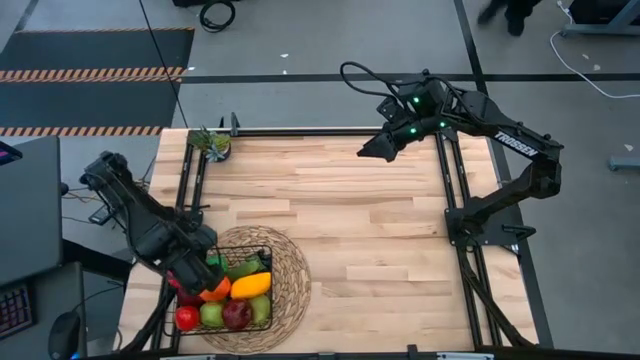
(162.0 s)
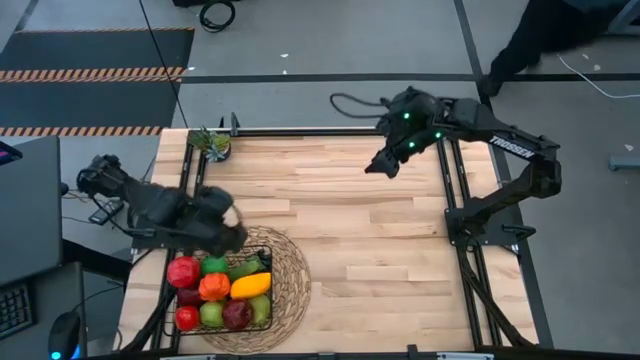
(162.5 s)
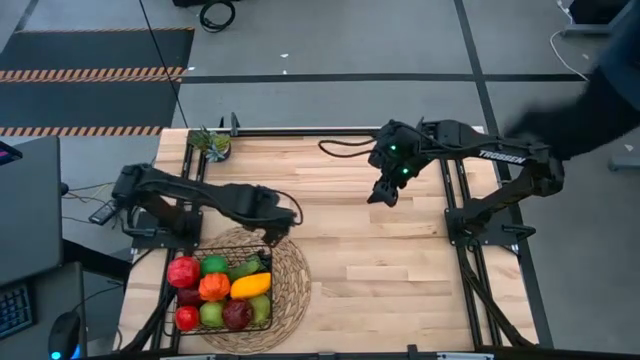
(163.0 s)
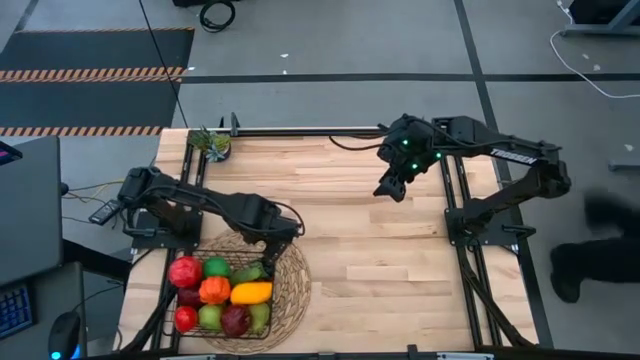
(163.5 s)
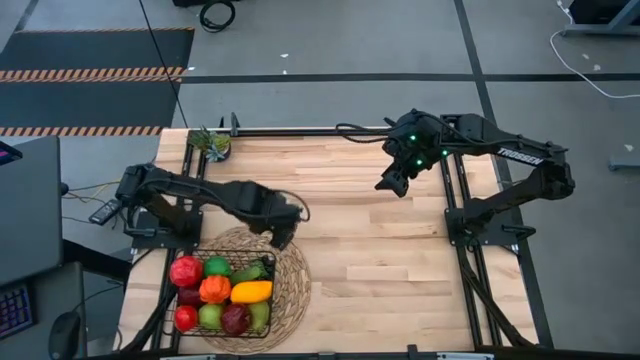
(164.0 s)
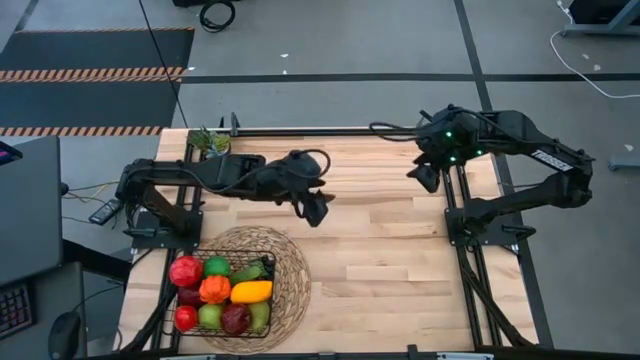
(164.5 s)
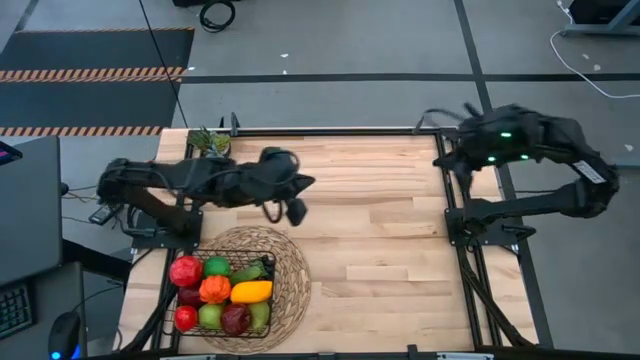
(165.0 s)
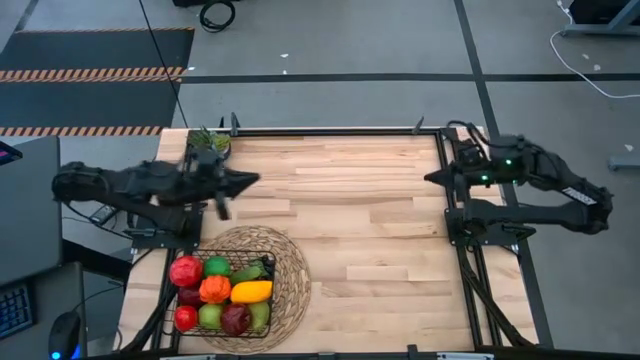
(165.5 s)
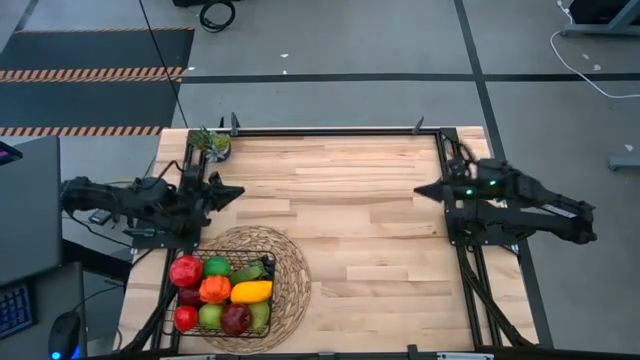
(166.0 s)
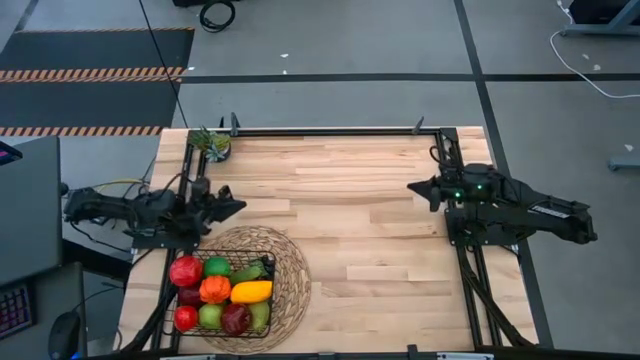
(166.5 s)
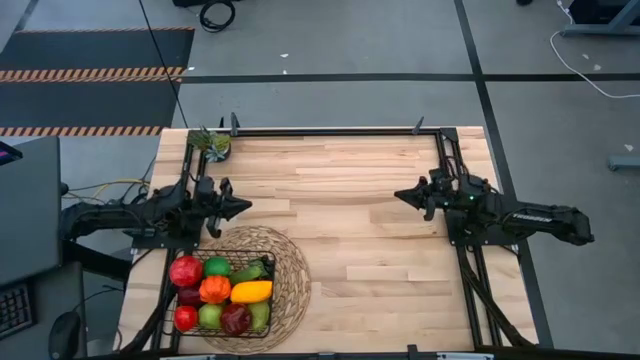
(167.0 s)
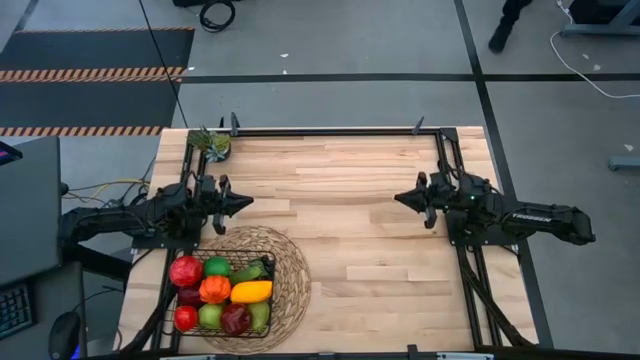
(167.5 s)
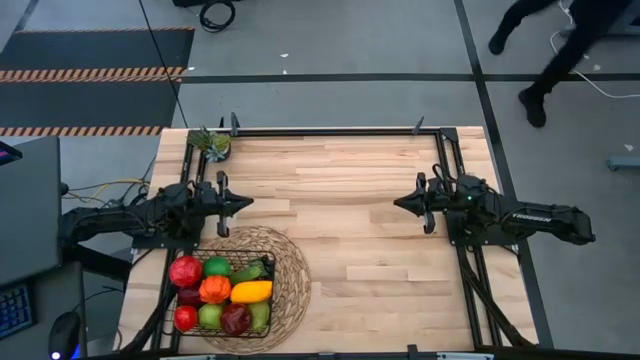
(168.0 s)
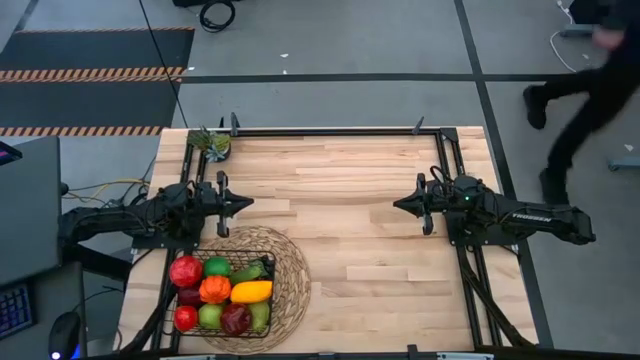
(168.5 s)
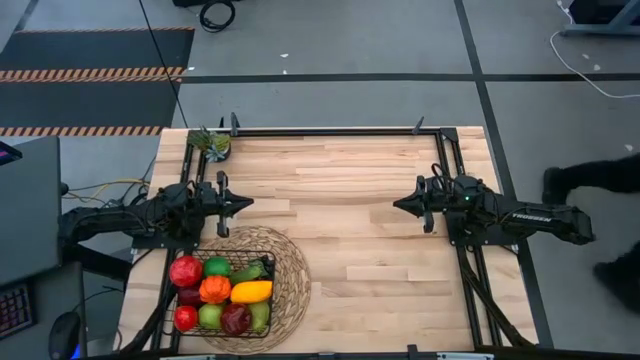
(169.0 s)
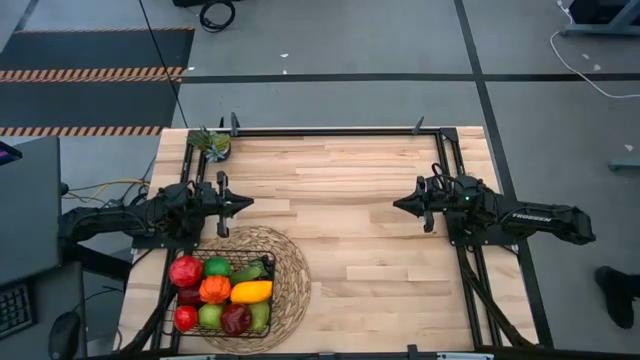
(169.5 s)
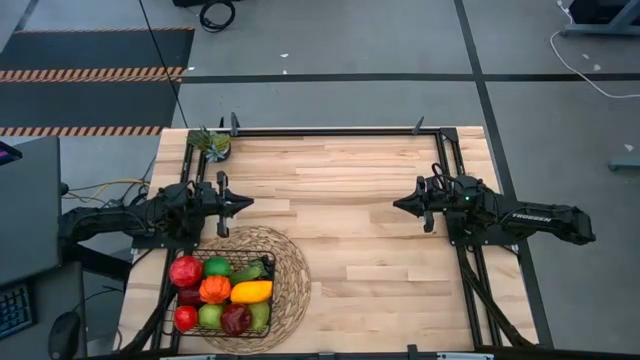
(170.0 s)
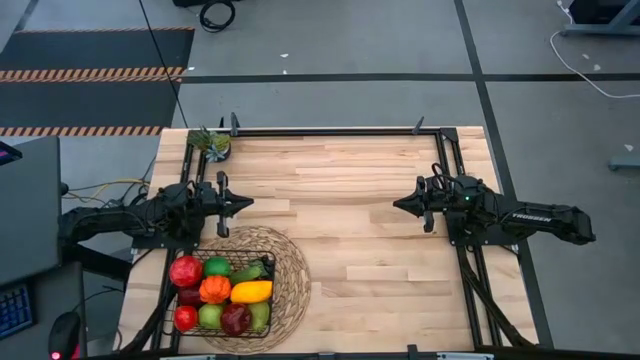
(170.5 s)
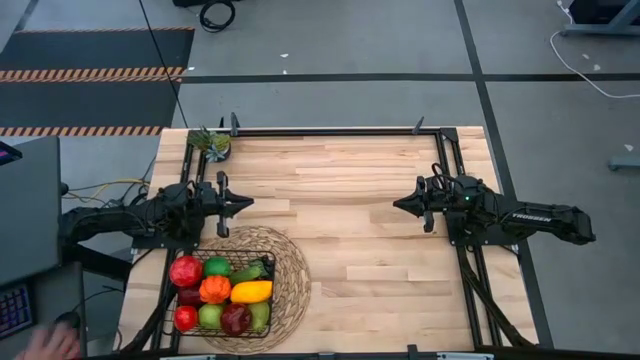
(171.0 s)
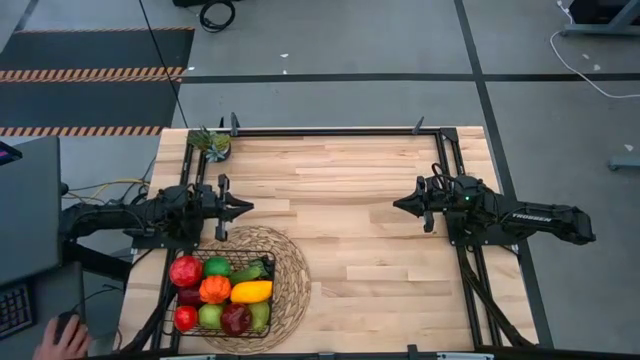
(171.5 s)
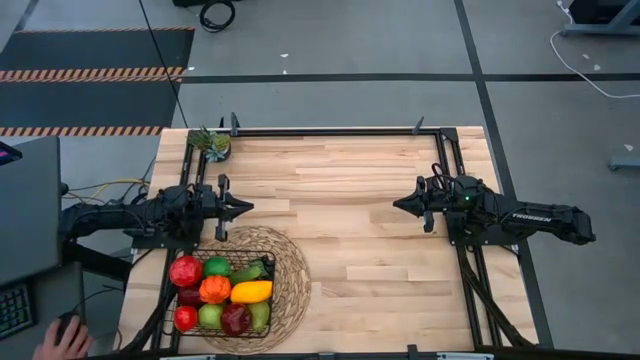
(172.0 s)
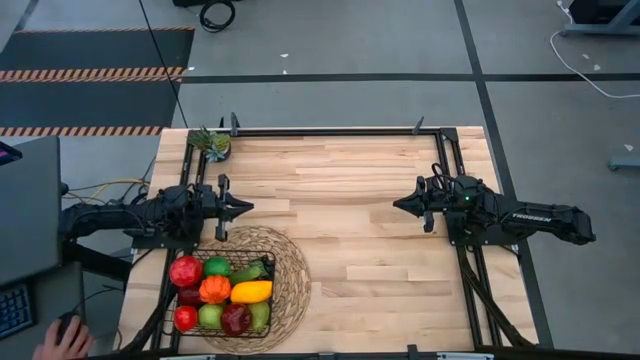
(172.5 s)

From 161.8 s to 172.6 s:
Task: Build produce basket
Return to Home Position

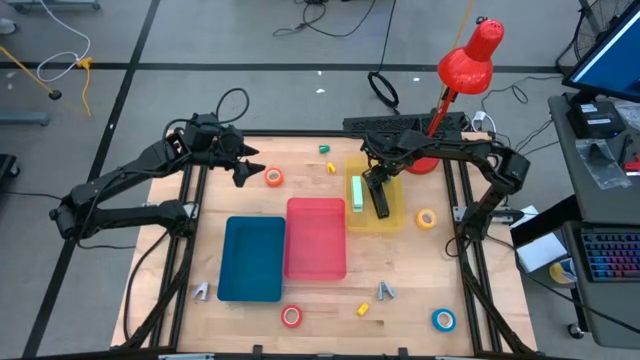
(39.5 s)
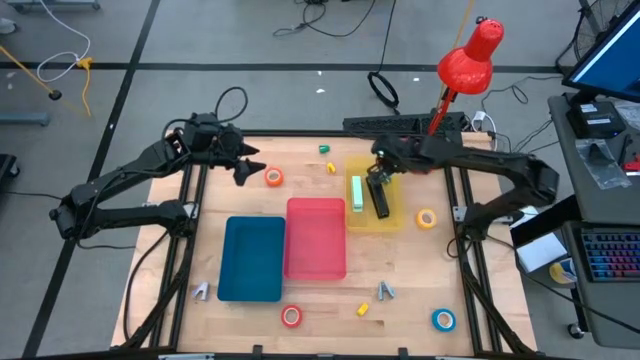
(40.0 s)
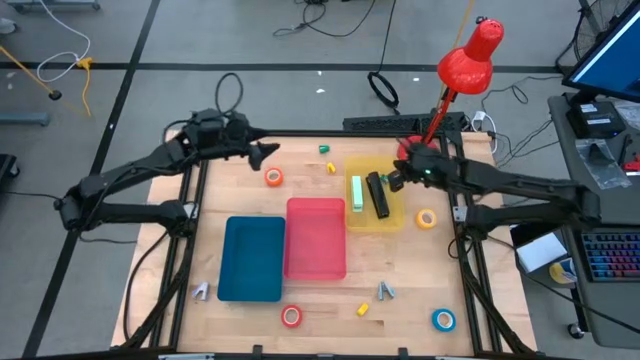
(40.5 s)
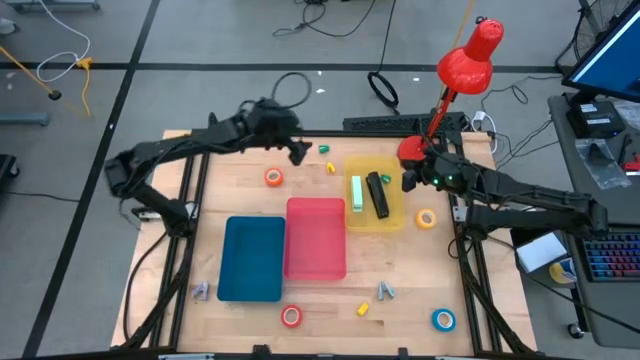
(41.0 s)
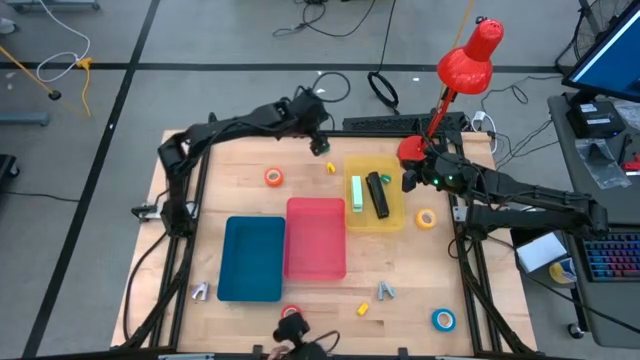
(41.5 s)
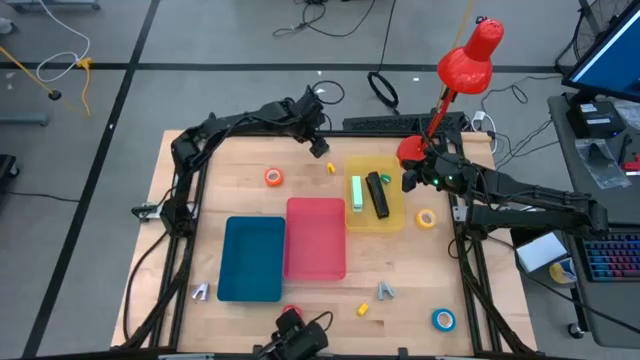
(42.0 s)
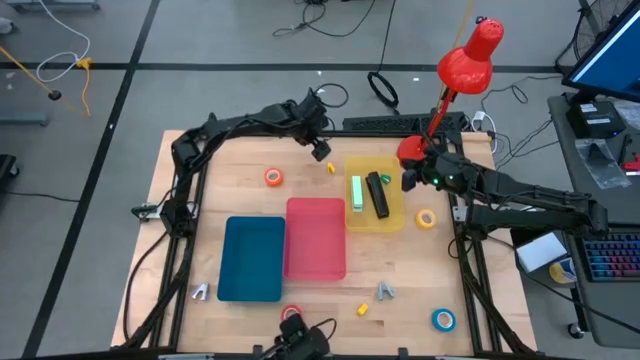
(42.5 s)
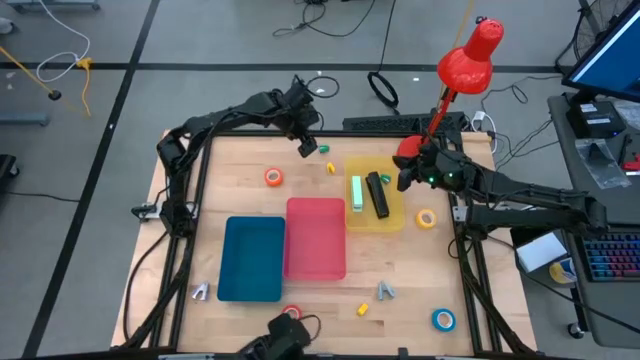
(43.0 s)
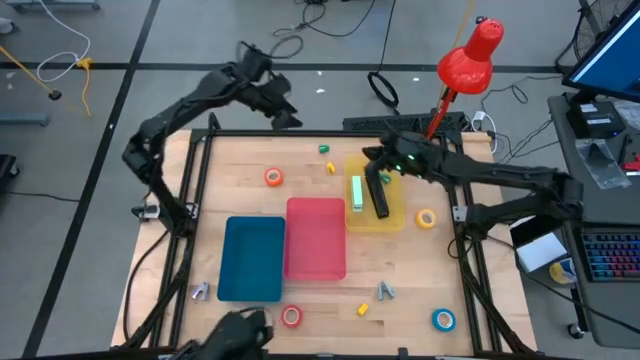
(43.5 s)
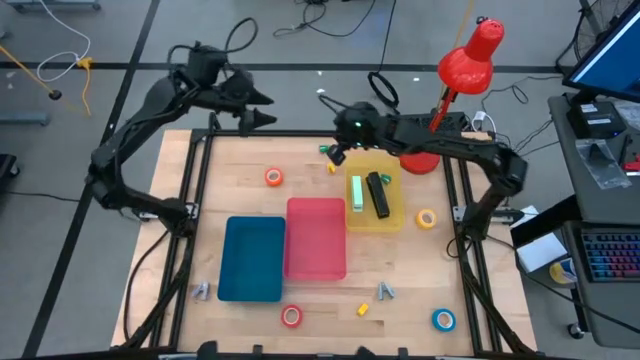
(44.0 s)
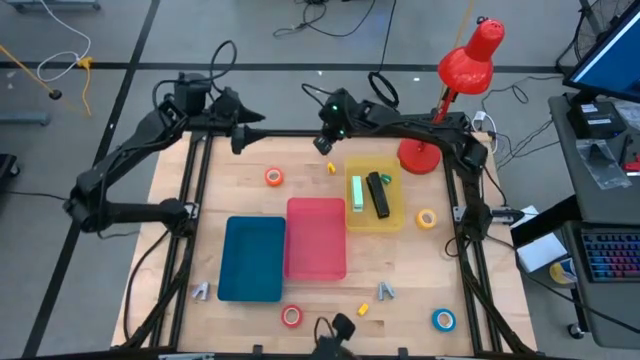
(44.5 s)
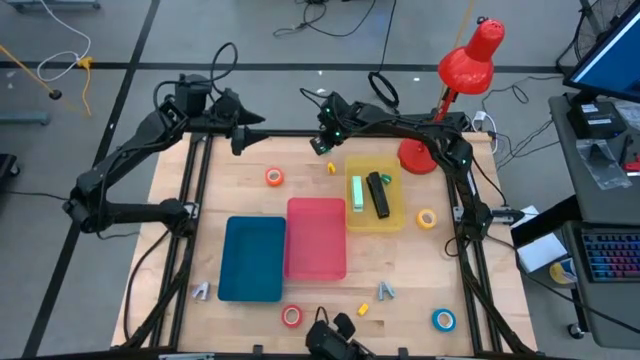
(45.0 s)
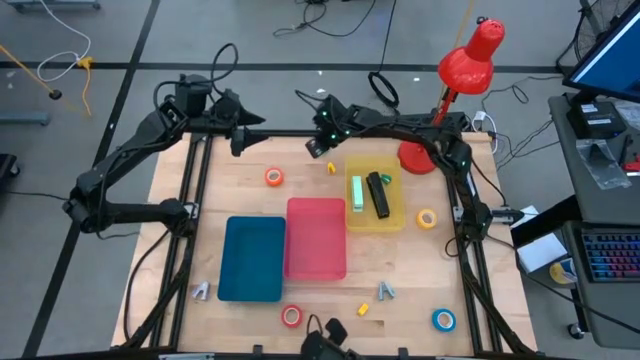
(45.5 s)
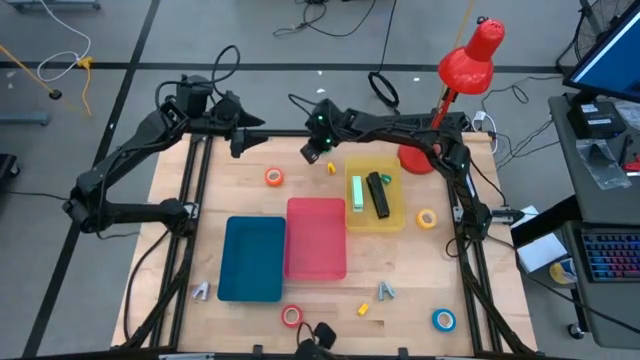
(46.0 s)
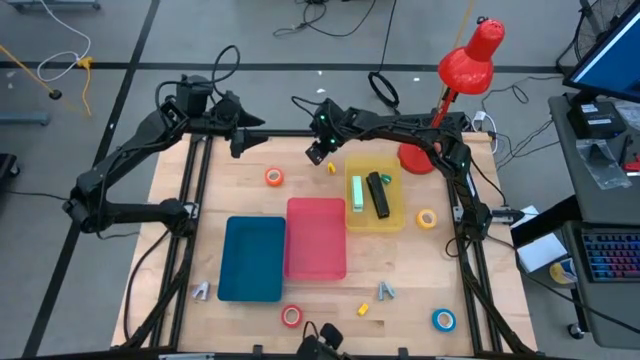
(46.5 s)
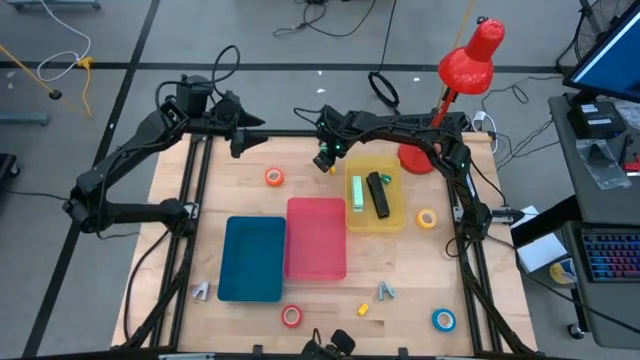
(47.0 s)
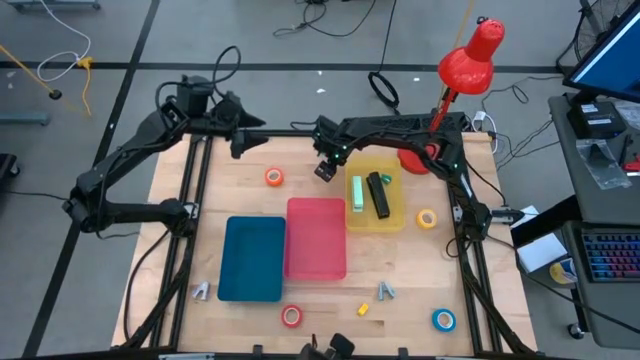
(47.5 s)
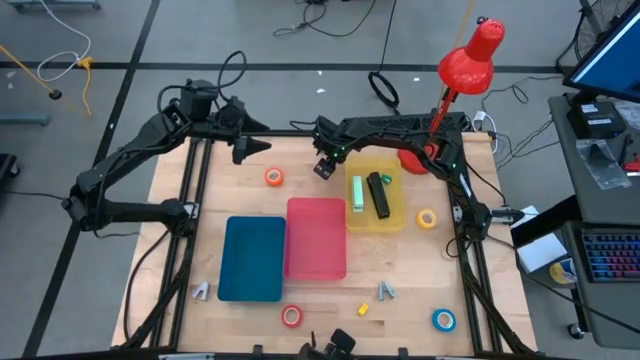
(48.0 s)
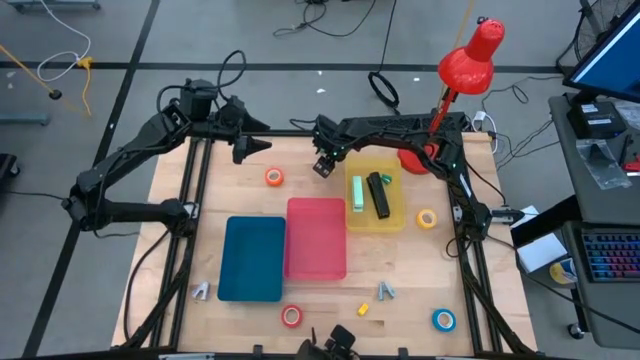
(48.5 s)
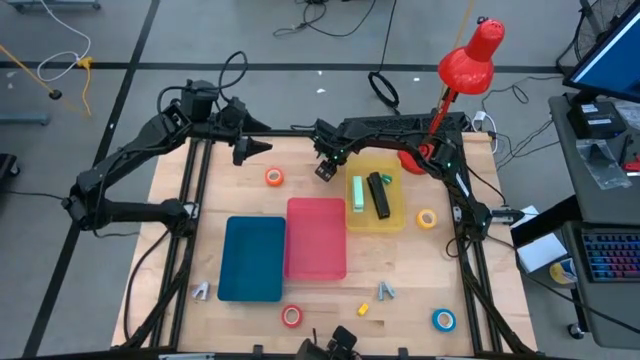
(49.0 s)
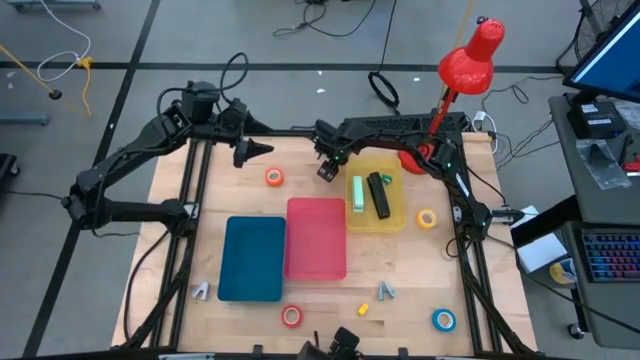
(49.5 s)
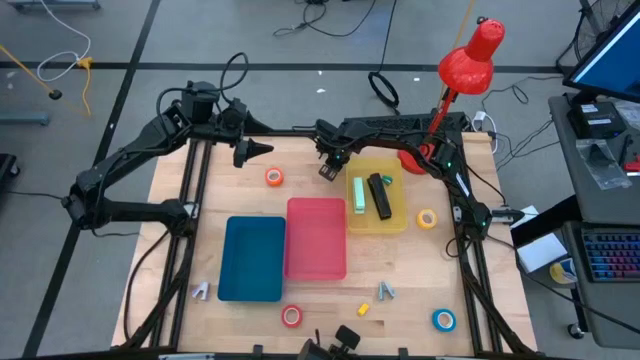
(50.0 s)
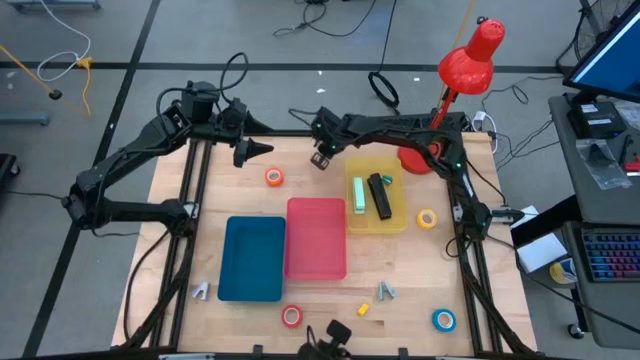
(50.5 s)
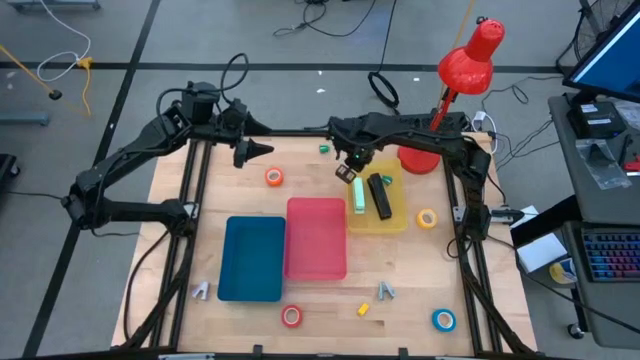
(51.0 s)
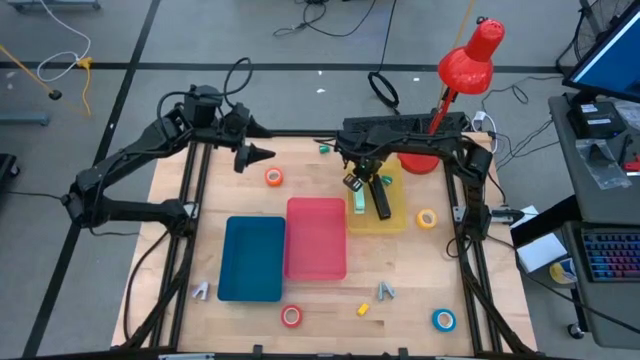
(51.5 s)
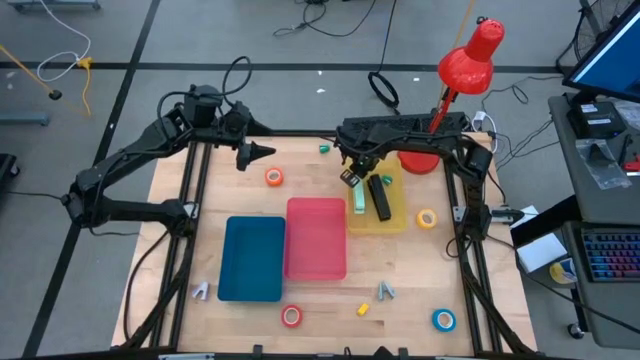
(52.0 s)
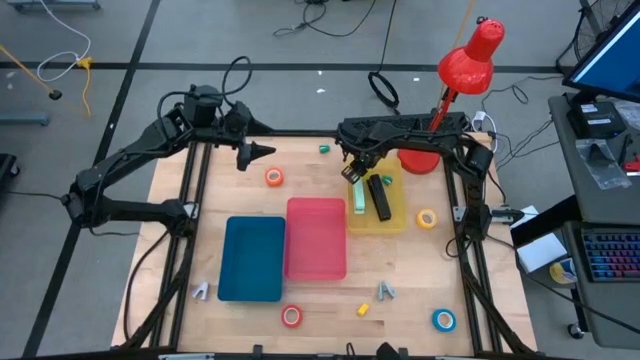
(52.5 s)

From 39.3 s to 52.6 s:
Task: Pick and place Stapler, Stapler remover, tape
Put the top yellow stapler into the yellow bin
